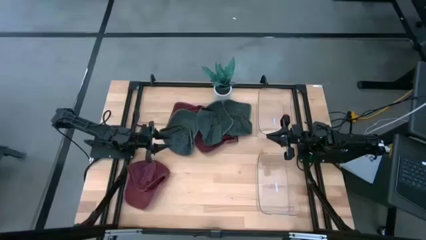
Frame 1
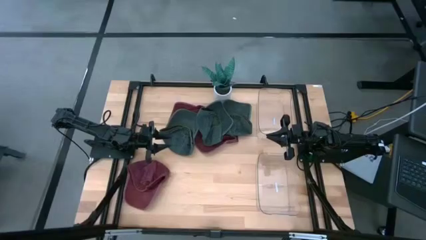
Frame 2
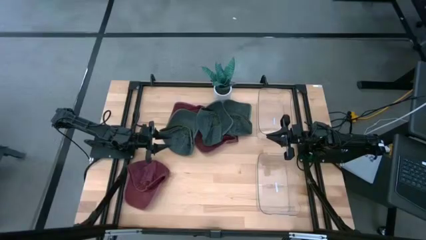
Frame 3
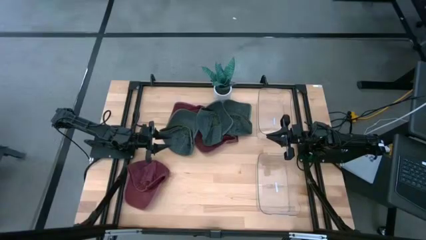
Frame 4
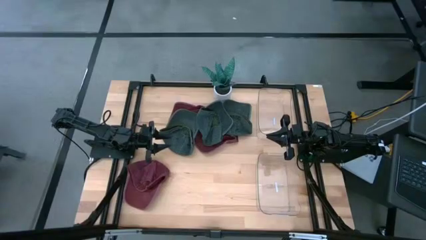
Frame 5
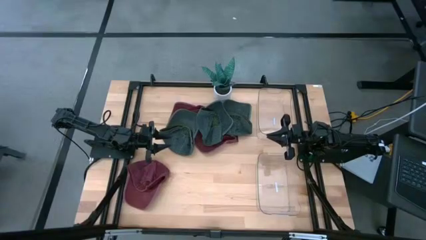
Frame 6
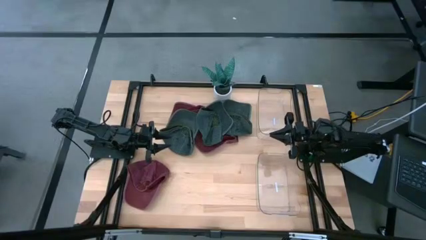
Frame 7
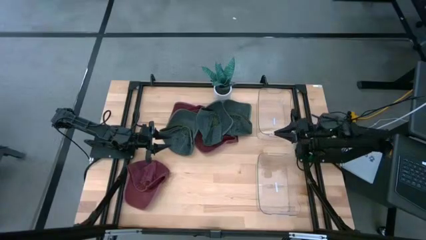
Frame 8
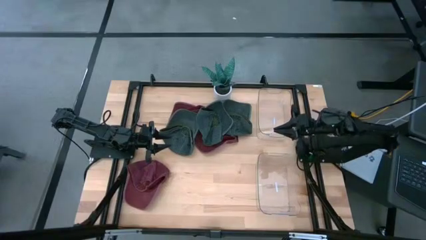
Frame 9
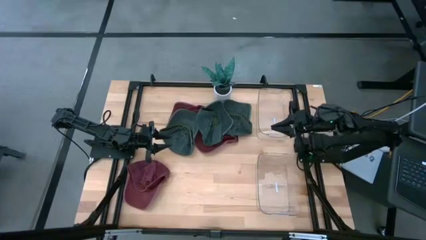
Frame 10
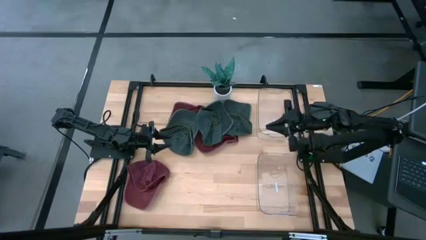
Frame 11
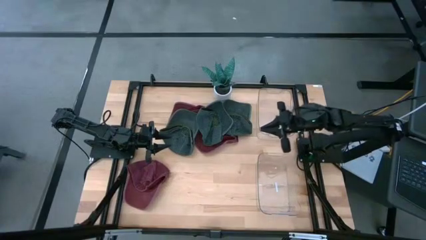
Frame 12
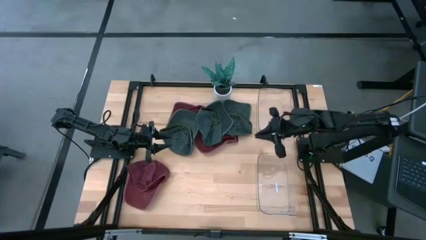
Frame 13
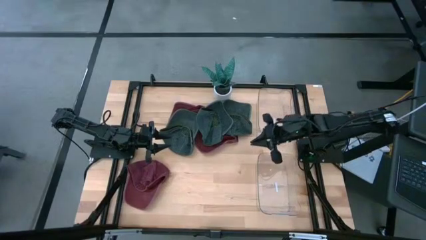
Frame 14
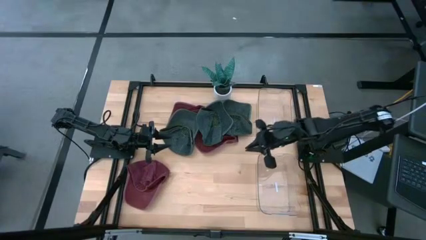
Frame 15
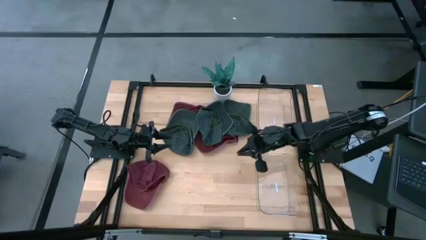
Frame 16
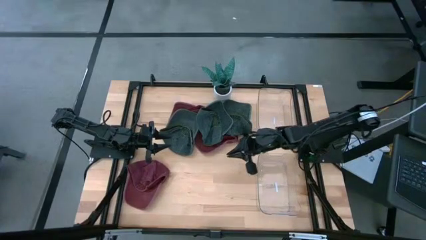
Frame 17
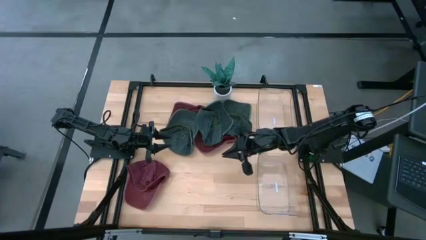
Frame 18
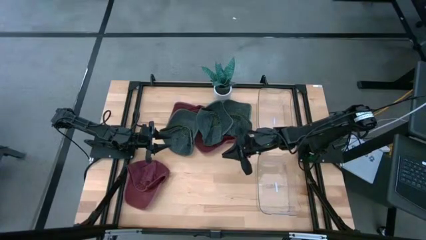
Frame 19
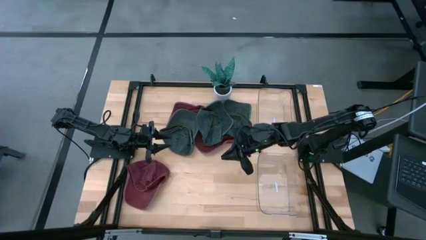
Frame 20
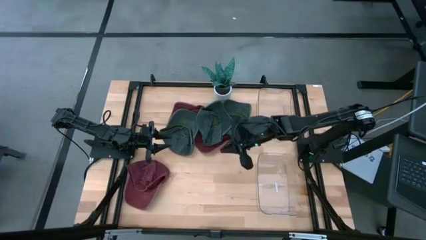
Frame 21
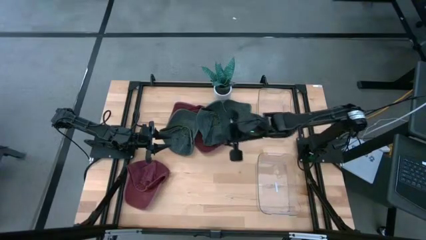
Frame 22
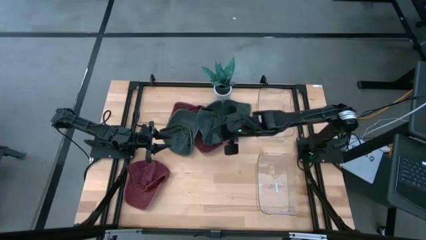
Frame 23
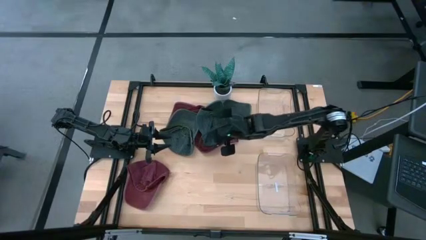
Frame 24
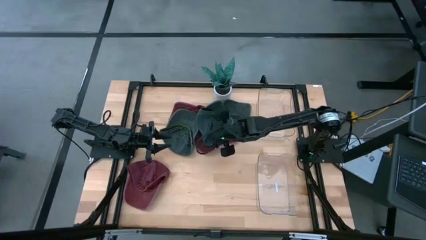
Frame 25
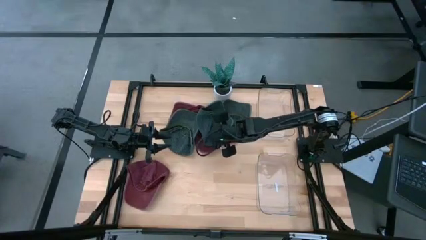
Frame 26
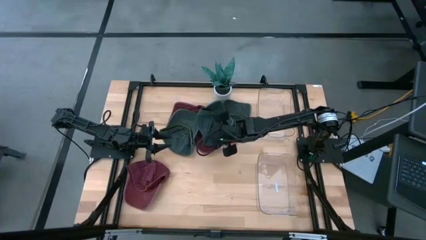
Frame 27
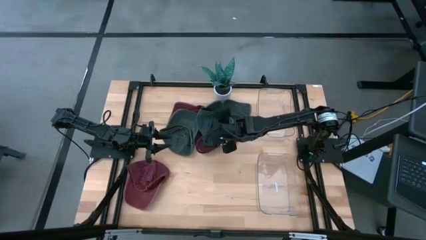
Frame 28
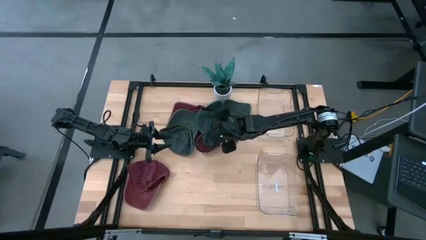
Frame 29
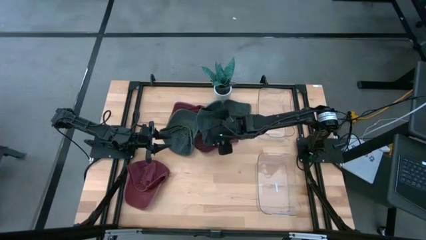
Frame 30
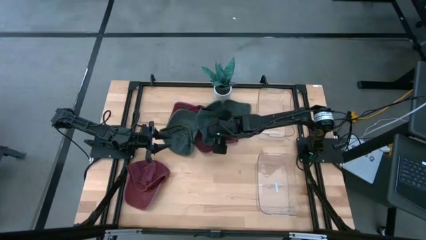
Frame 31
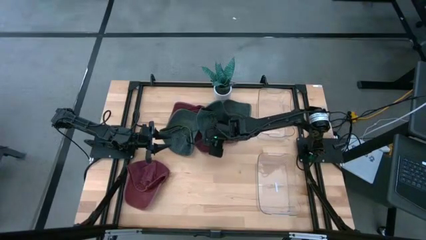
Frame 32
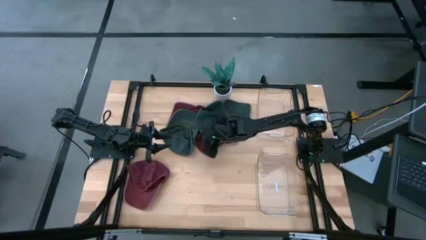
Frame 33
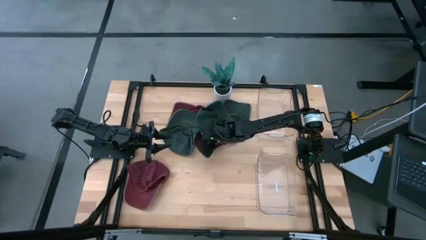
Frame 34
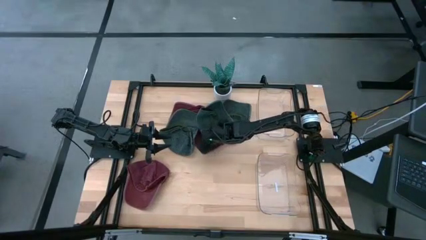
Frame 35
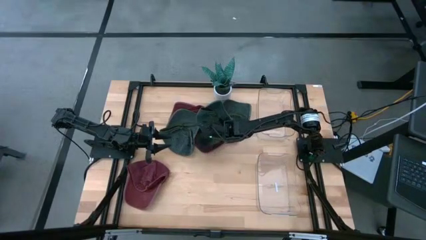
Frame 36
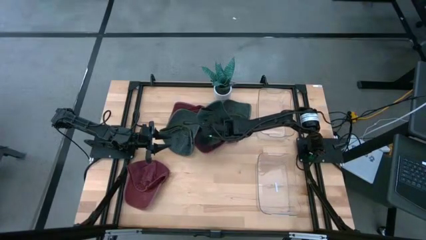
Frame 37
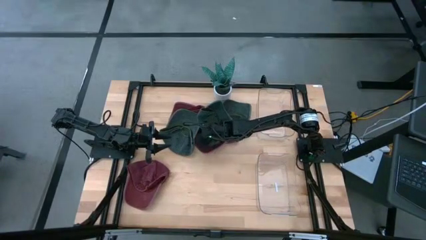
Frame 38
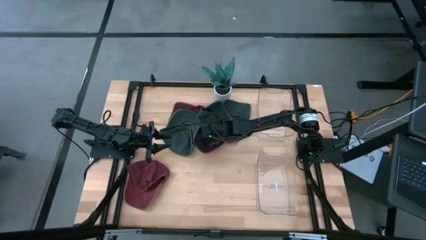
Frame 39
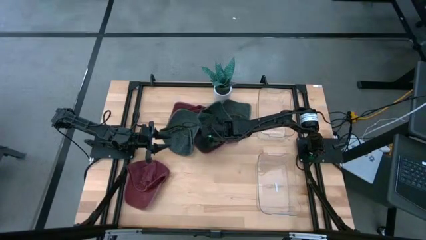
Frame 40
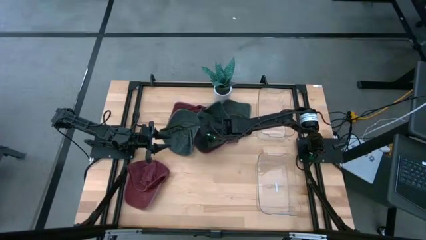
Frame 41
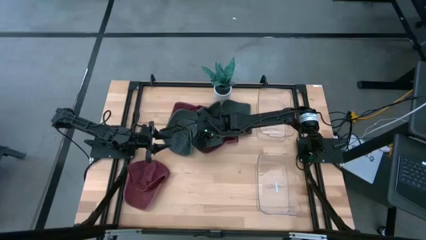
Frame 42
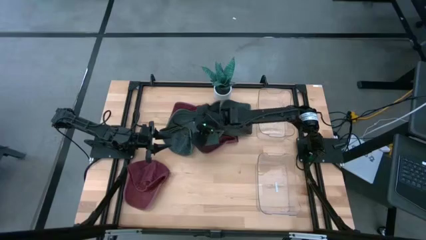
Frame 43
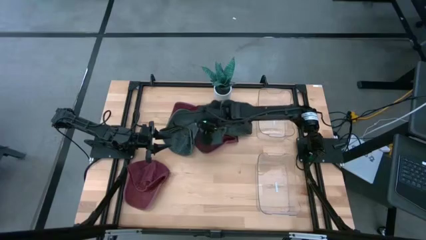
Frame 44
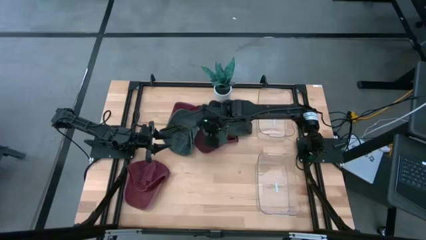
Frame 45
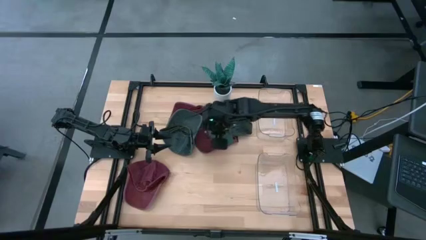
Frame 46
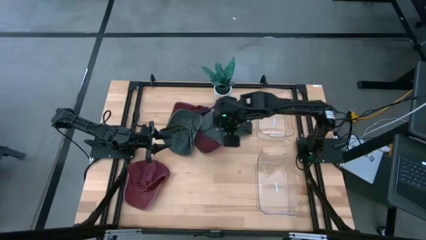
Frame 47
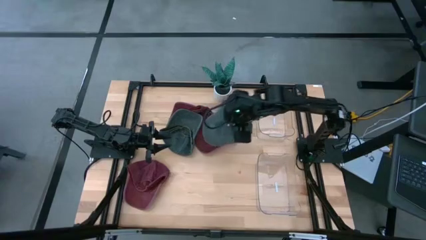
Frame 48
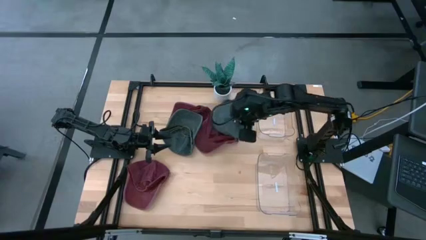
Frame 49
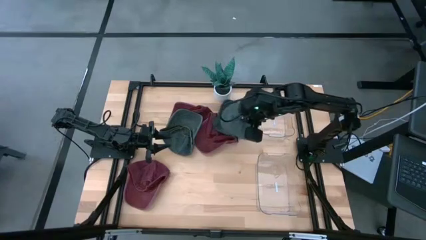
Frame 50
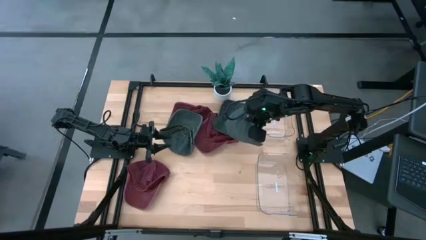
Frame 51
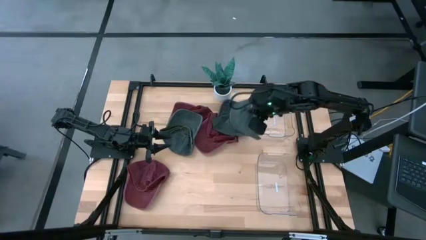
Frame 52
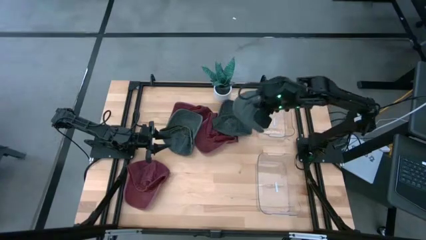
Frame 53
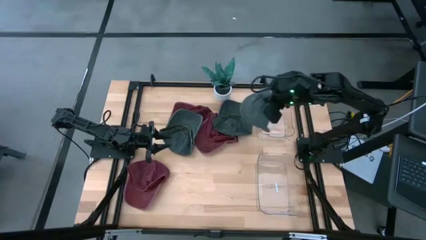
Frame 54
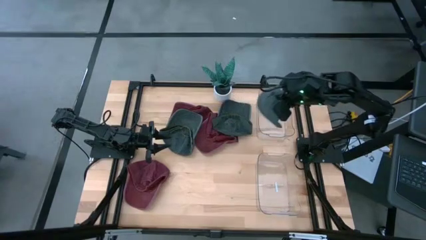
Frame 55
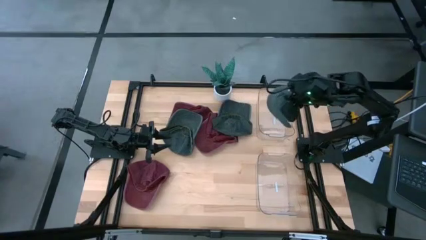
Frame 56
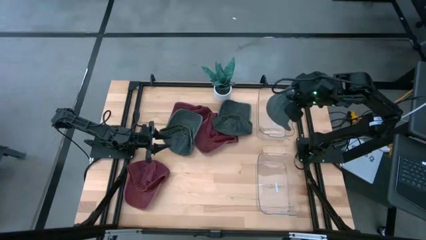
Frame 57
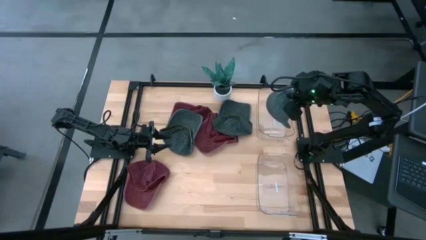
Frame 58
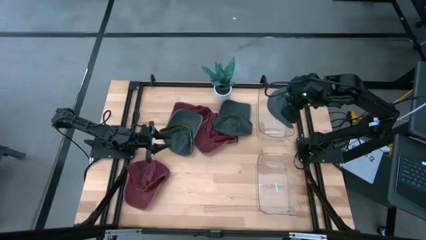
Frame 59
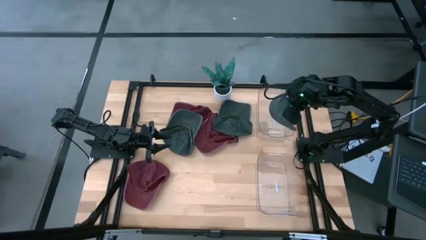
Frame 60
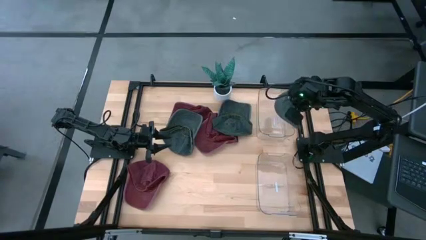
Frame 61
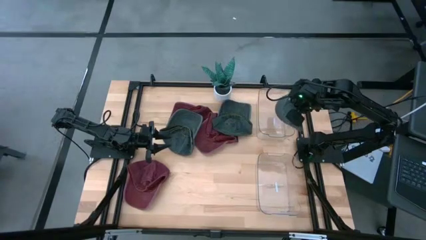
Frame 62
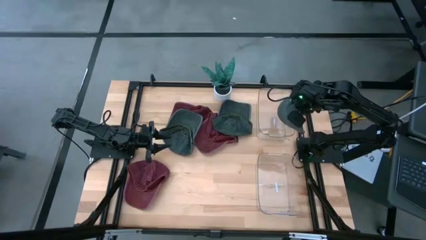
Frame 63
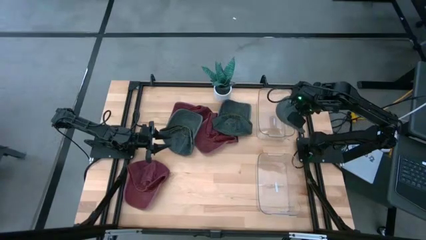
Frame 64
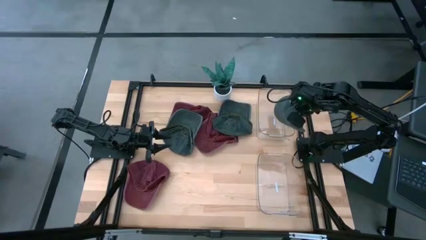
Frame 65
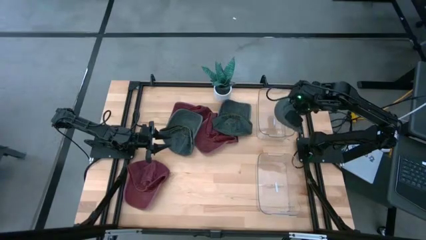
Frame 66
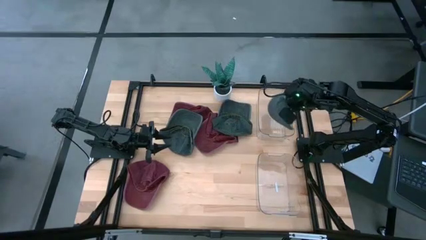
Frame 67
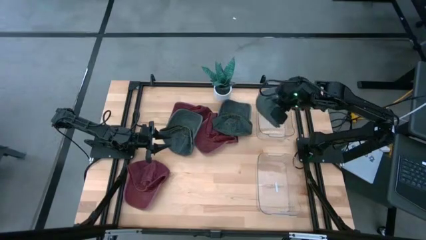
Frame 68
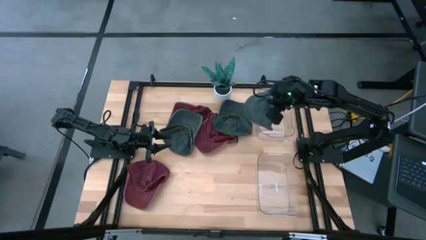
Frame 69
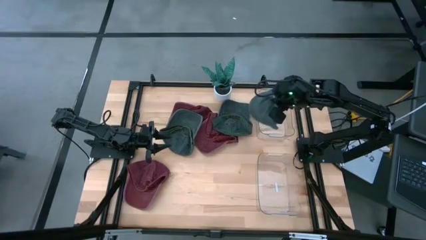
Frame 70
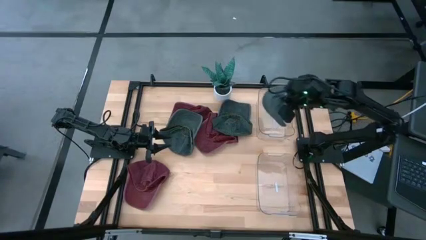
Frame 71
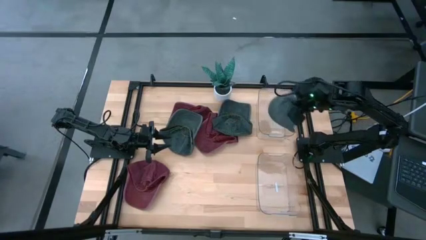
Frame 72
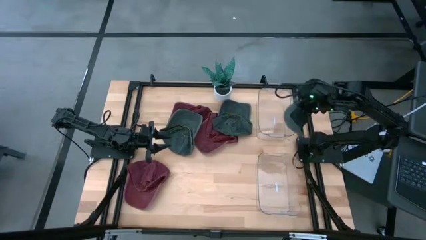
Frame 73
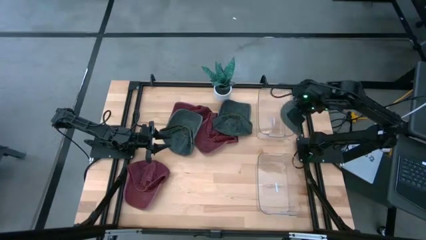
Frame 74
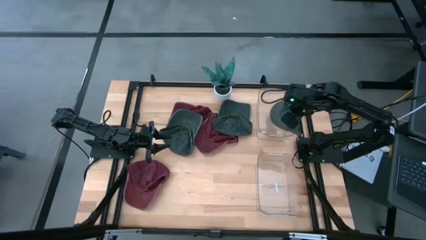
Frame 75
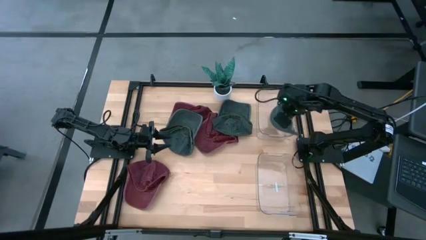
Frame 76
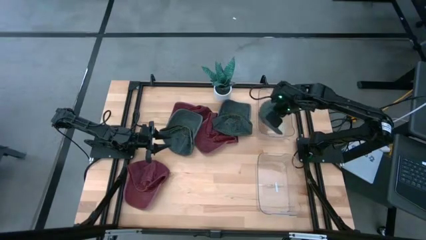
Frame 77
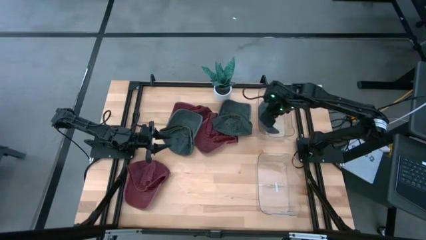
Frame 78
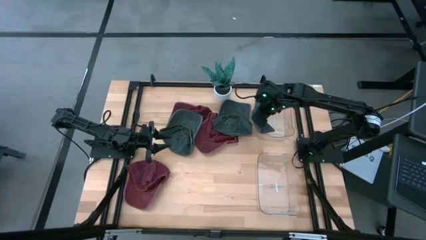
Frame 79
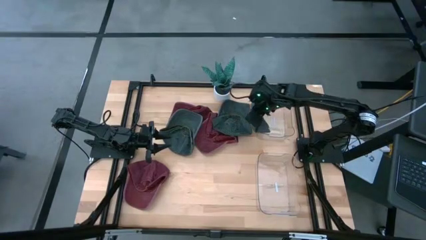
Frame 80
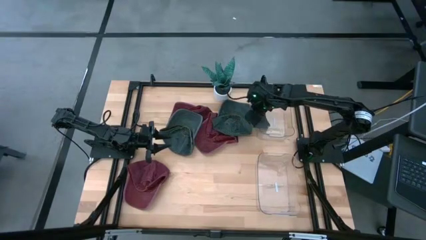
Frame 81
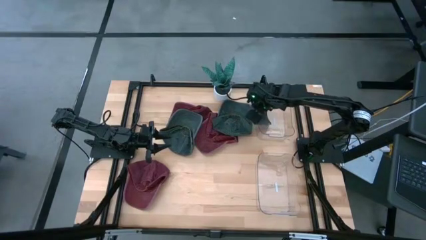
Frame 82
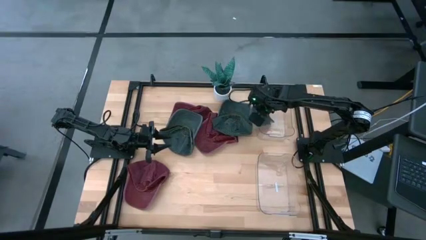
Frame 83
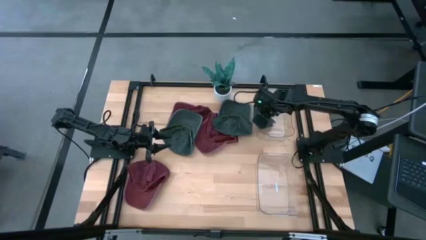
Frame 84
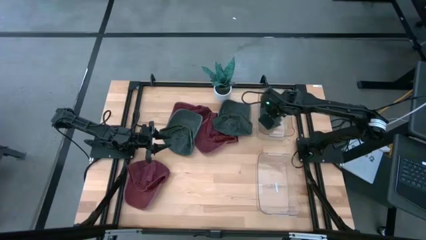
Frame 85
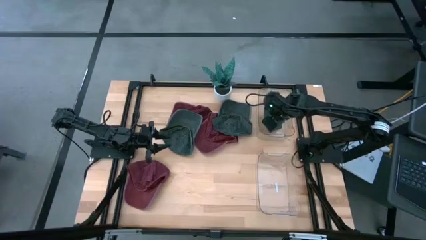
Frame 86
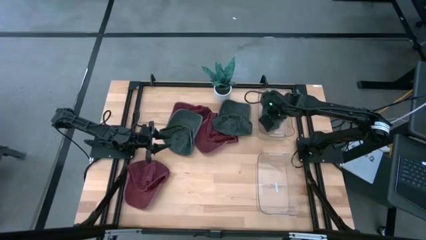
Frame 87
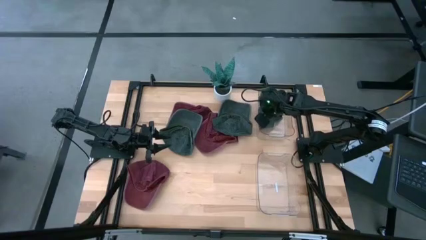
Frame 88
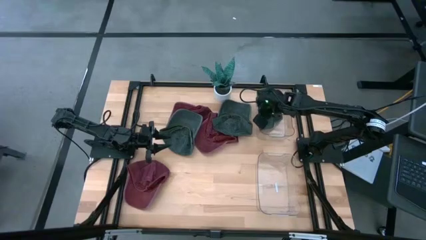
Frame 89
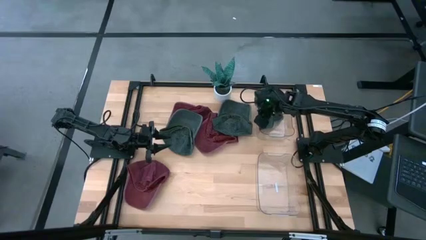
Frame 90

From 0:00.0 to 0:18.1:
Task: Pick & Place hat
Put the middle black cap into the top transparent bin
